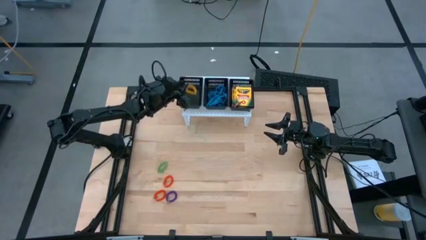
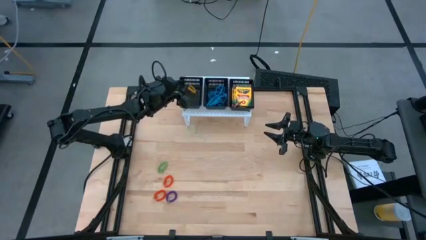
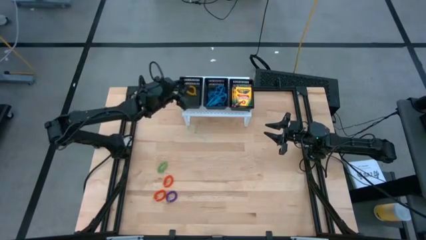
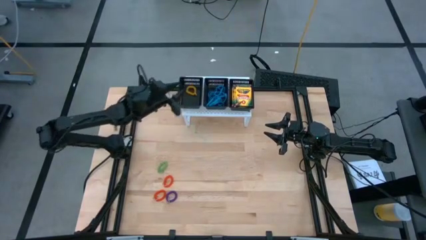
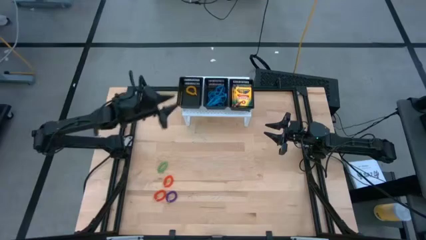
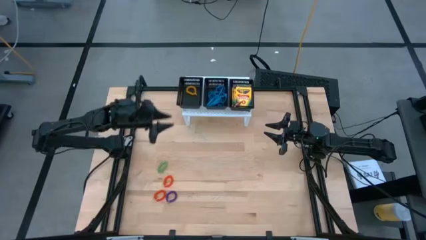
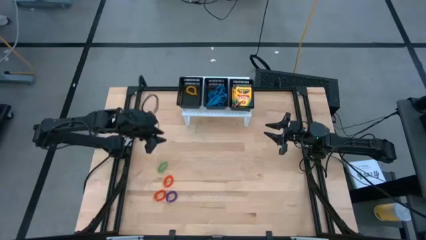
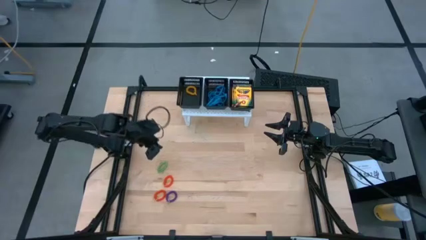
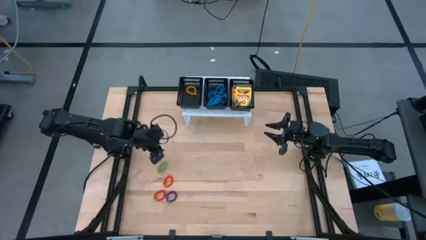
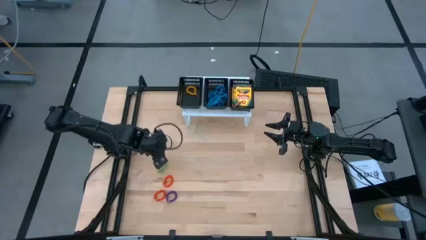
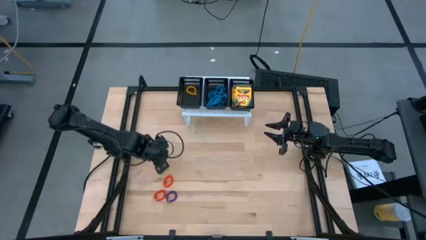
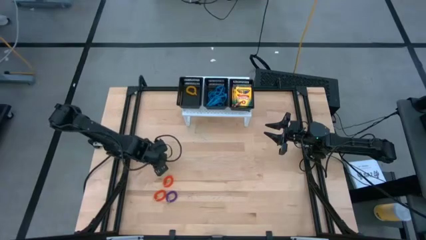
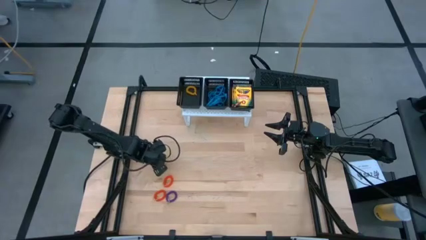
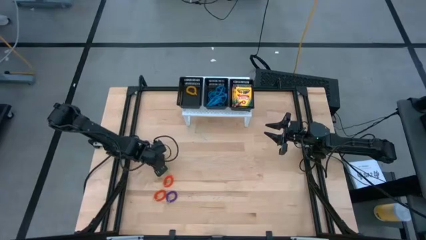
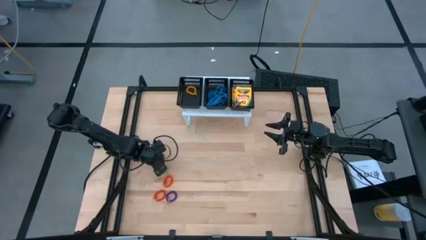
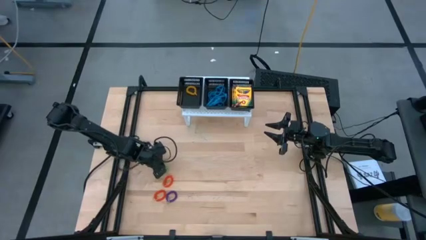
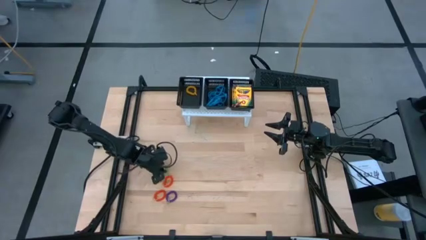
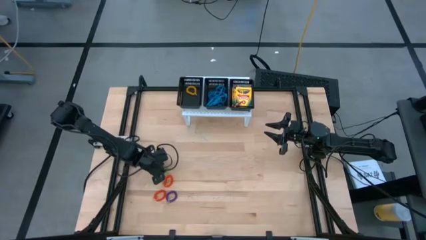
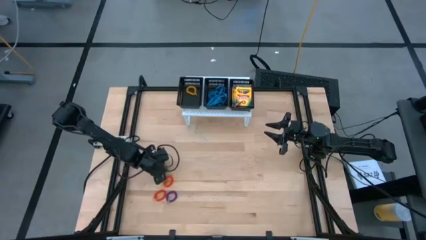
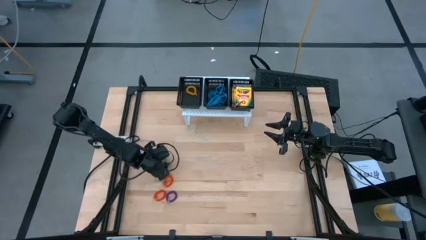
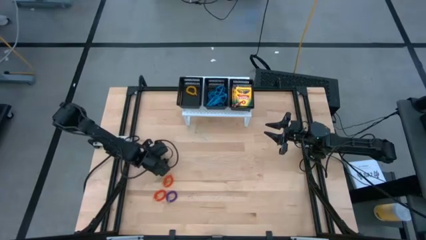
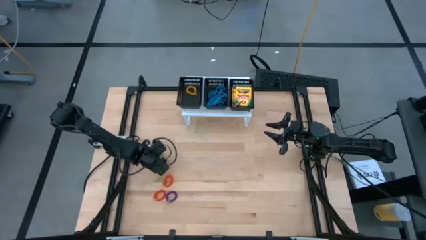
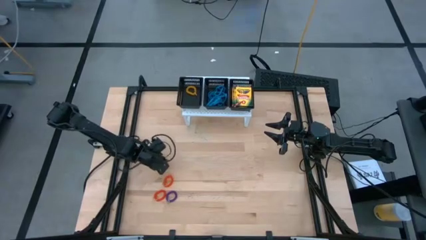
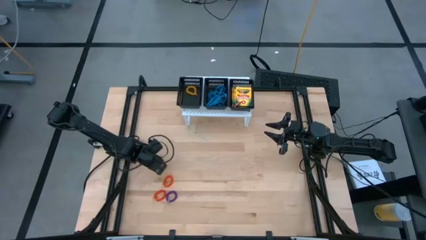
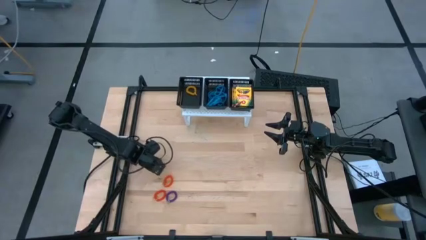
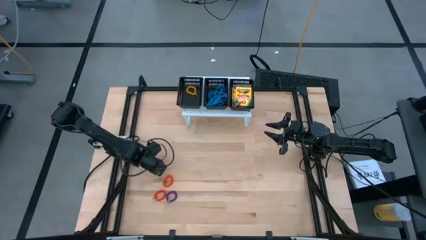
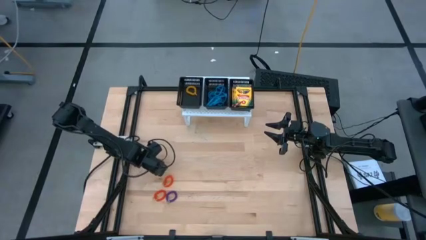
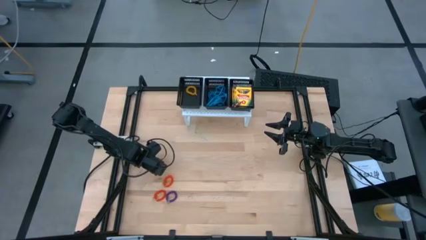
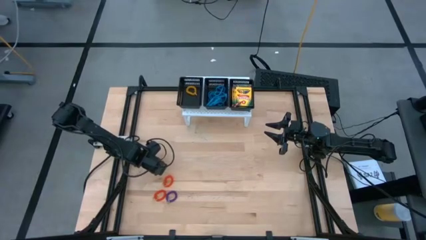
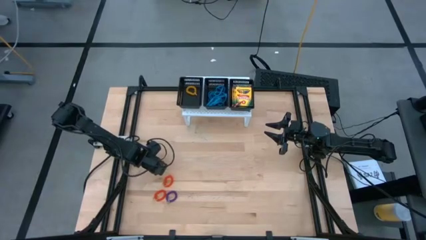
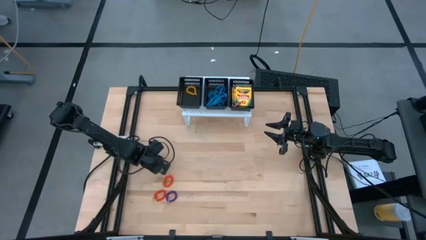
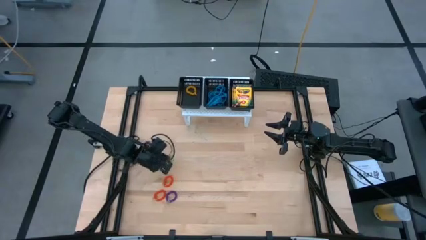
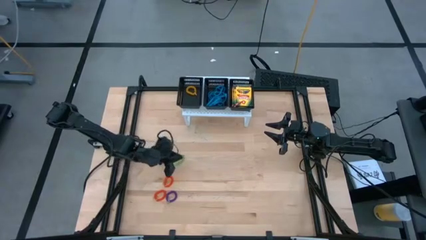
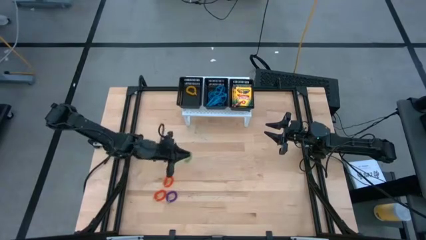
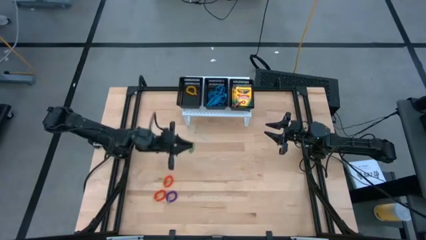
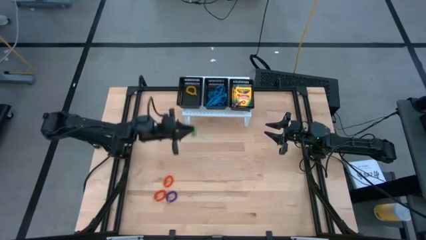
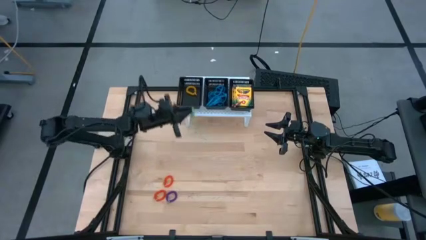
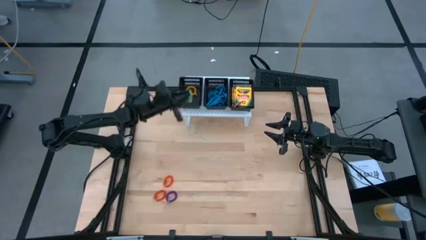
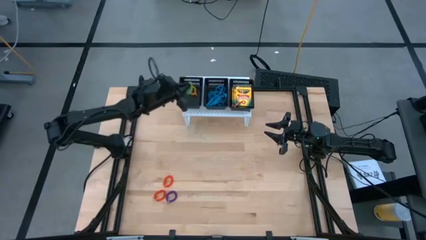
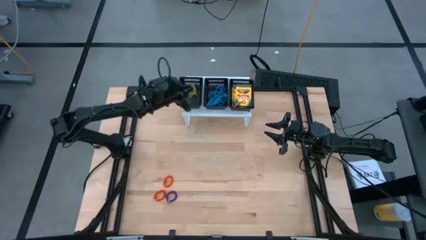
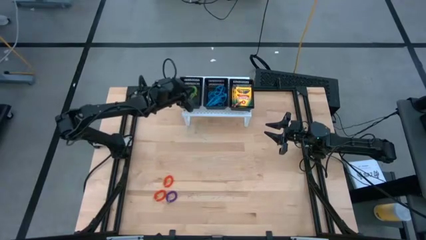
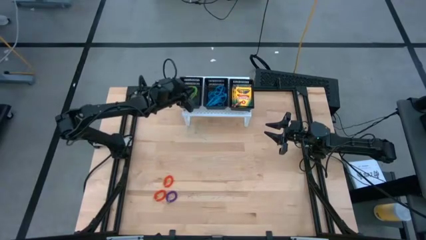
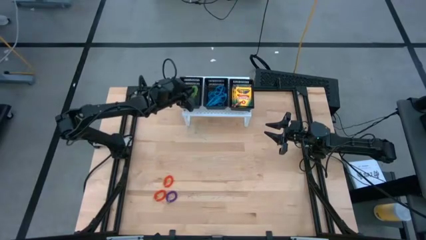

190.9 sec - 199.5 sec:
Task: Pick & Place Office Desk Supplies
Put the green spring keychain into the left black bin

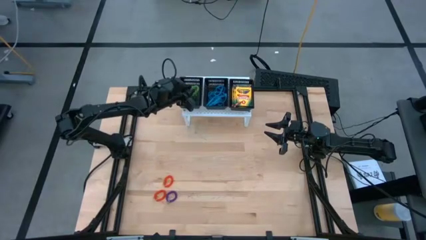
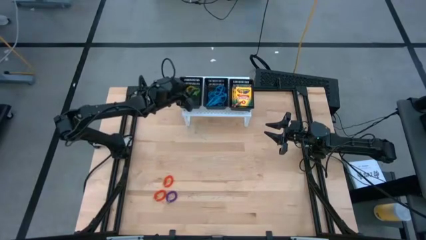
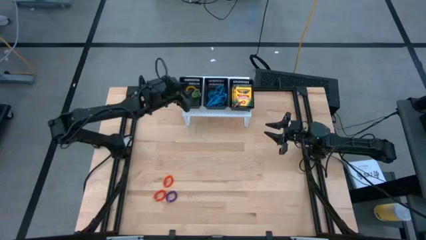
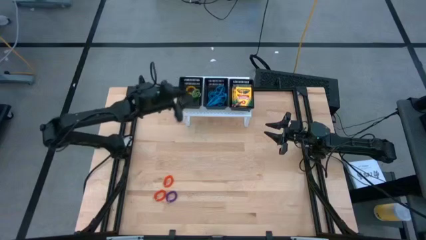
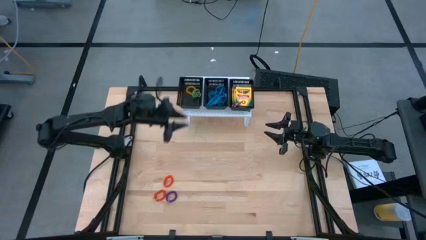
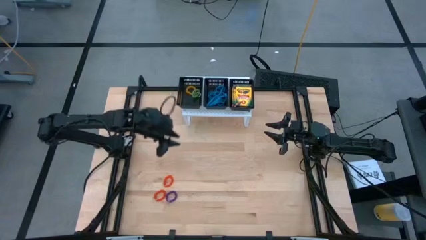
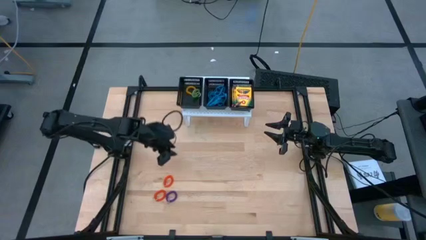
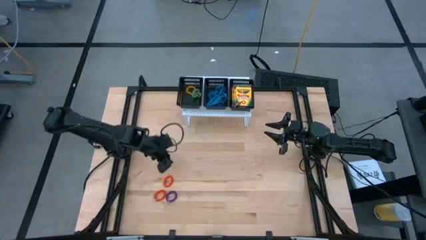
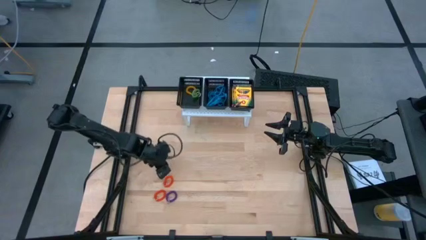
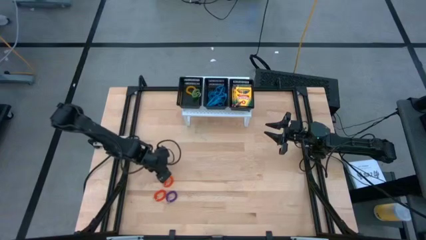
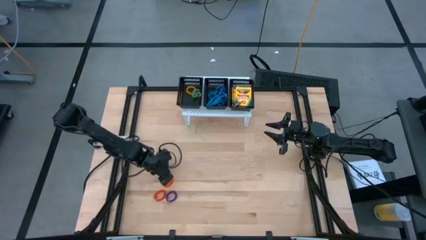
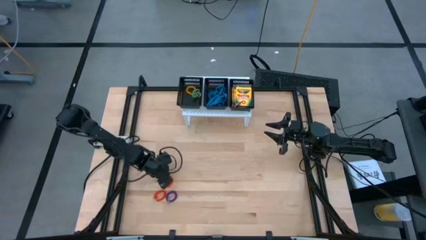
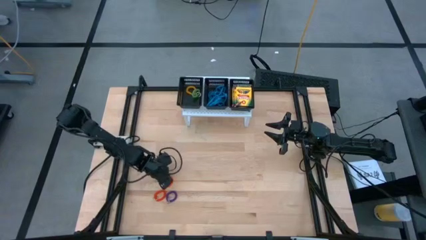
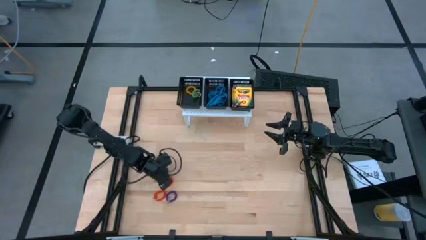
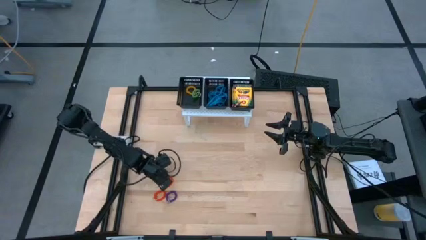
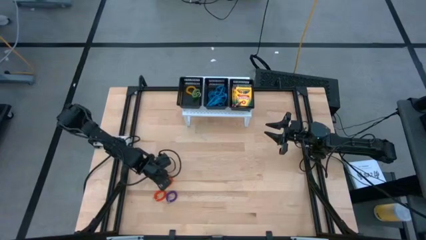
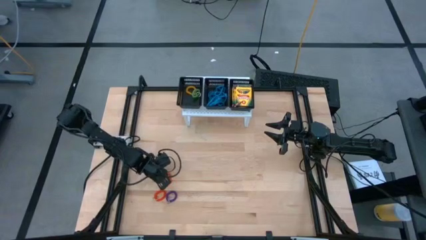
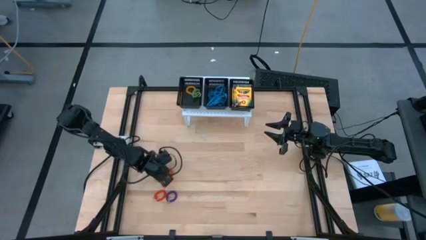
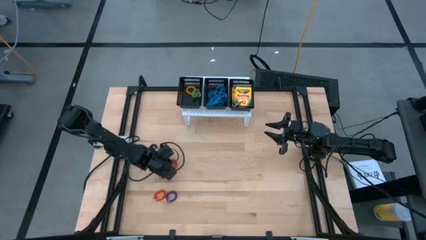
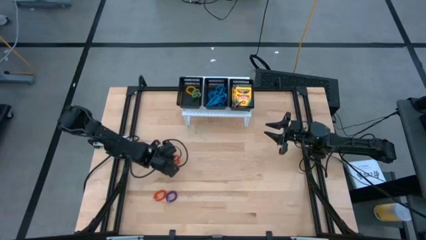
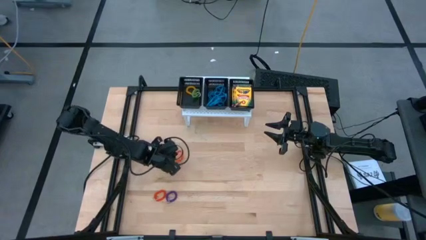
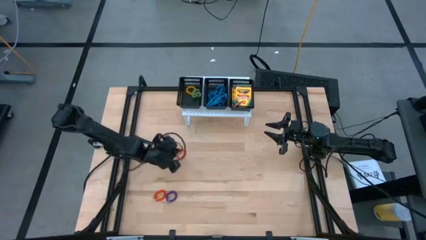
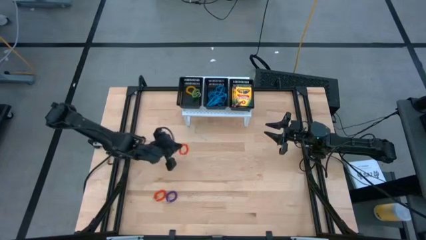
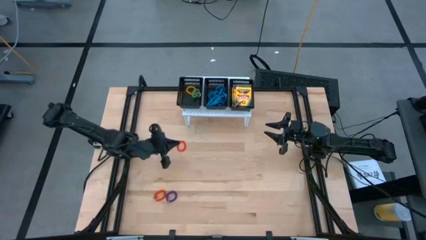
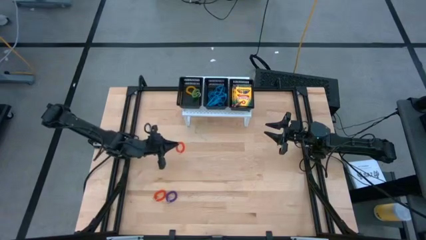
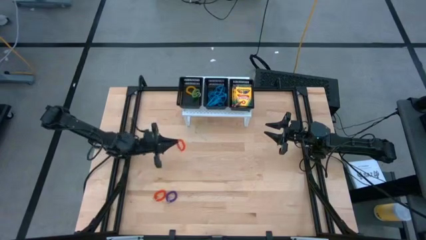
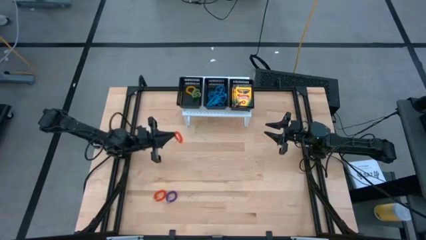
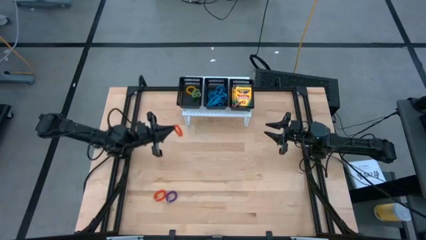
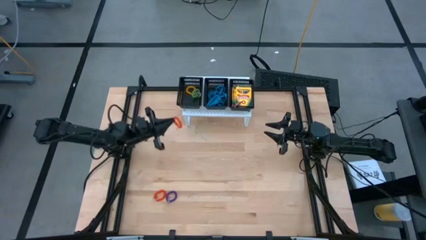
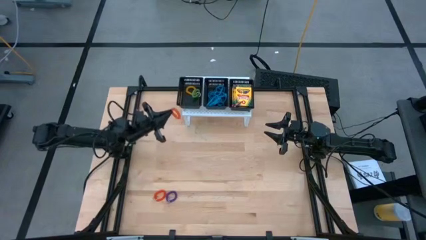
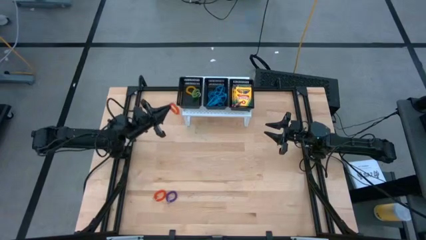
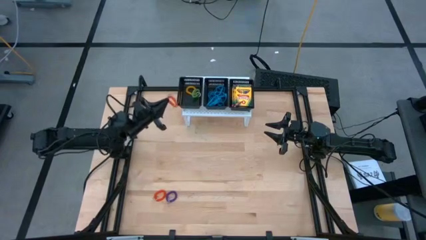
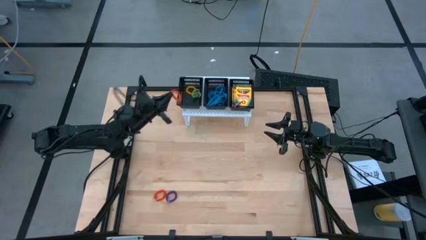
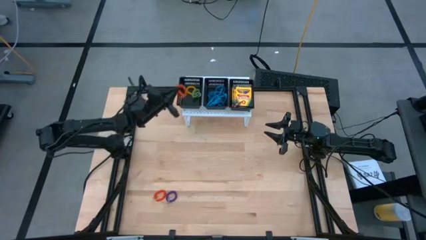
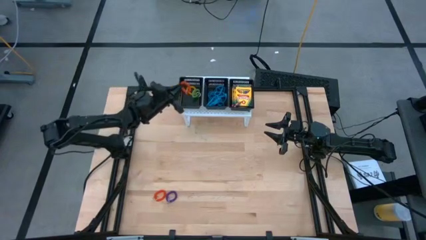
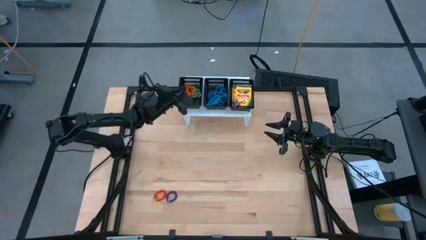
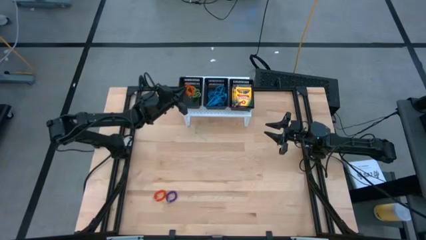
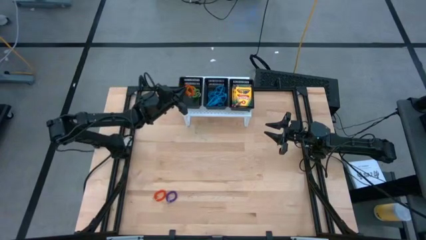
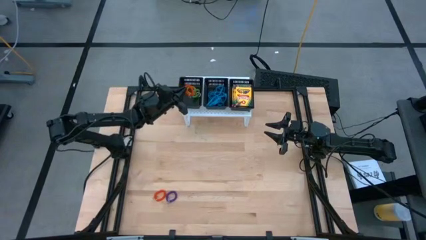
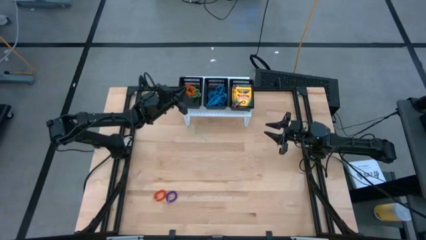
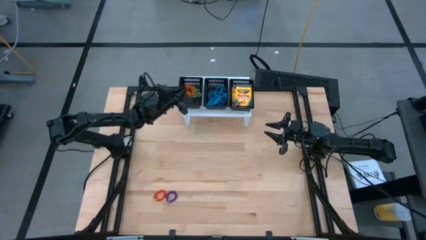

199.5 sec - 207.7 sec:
Put the orange spring keychain into the left black bin
